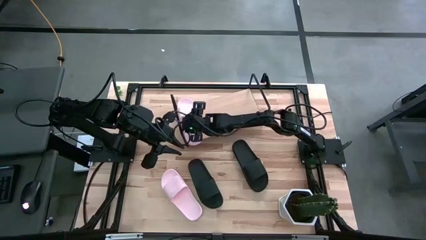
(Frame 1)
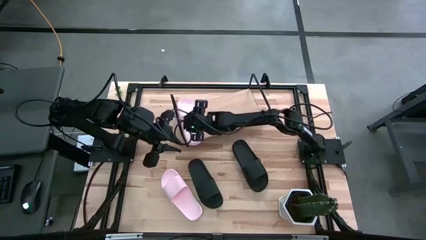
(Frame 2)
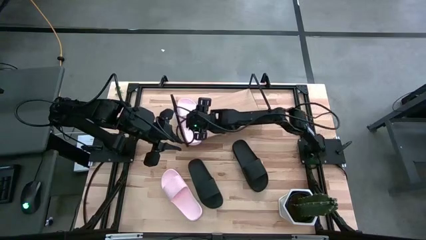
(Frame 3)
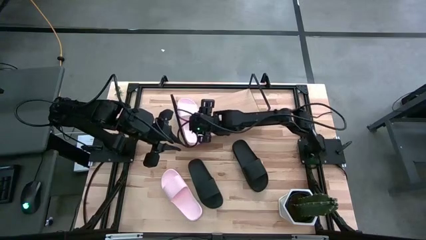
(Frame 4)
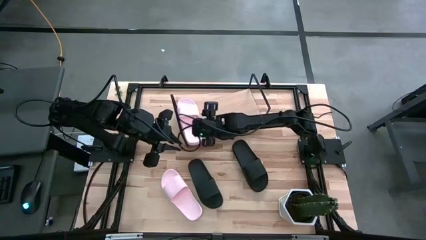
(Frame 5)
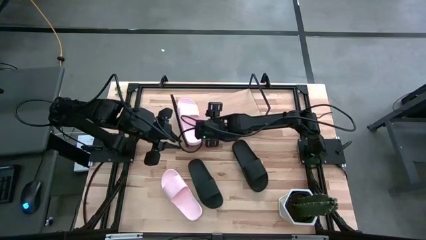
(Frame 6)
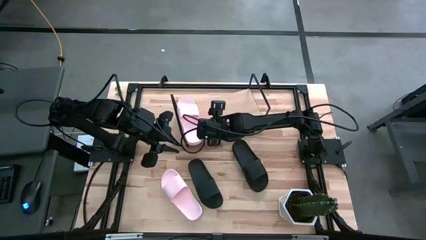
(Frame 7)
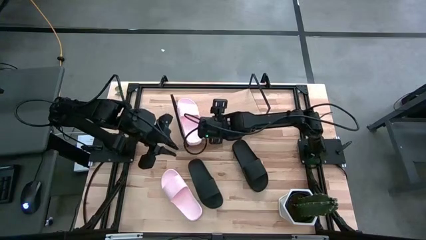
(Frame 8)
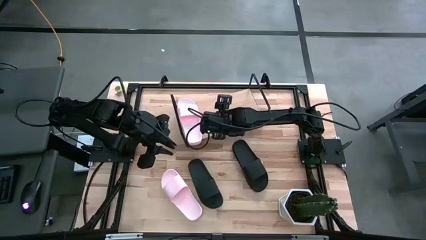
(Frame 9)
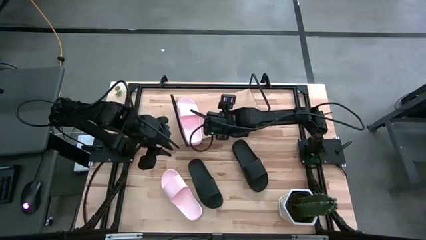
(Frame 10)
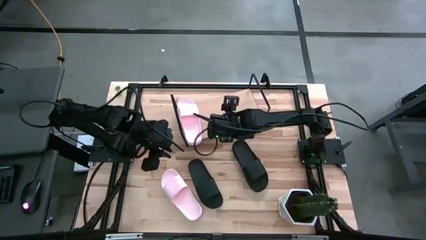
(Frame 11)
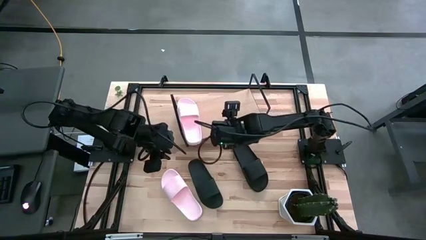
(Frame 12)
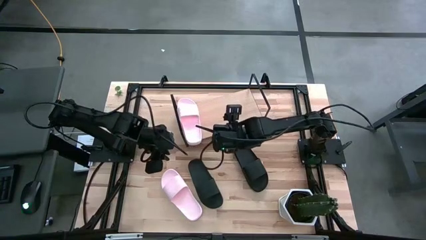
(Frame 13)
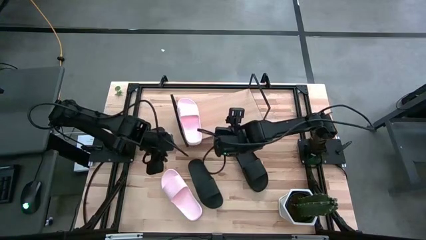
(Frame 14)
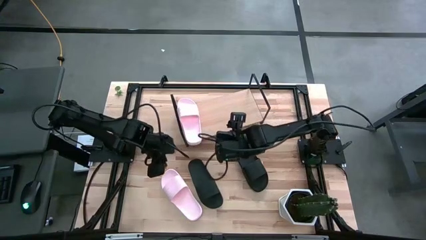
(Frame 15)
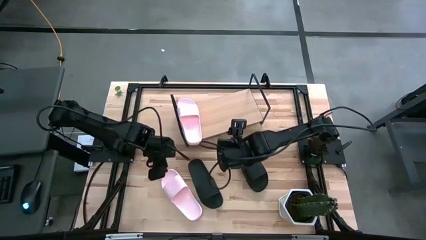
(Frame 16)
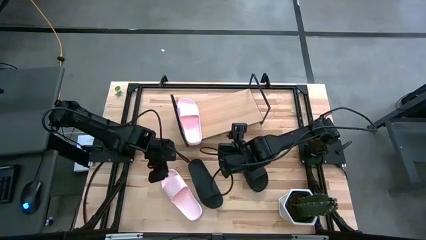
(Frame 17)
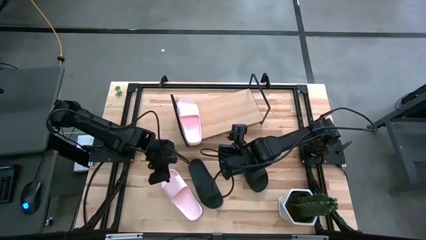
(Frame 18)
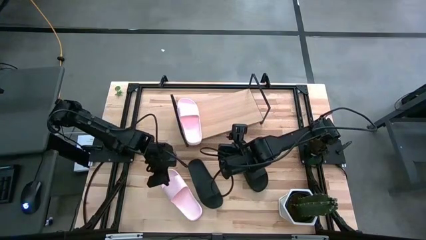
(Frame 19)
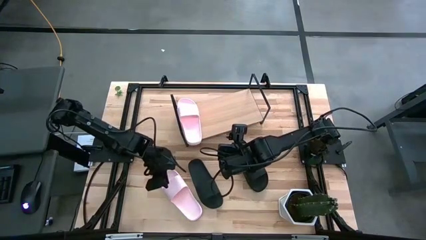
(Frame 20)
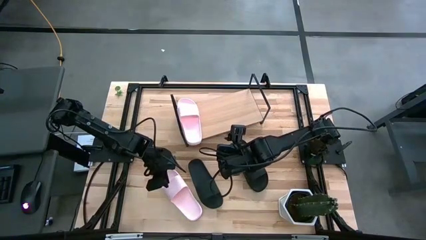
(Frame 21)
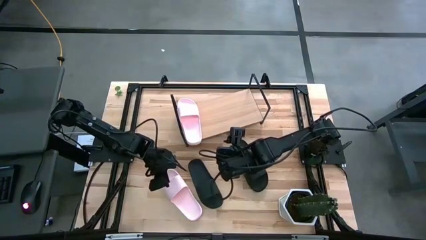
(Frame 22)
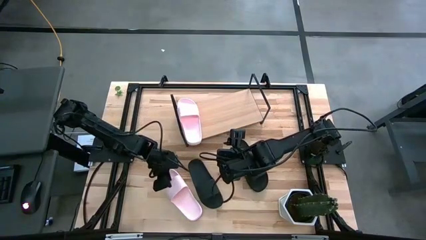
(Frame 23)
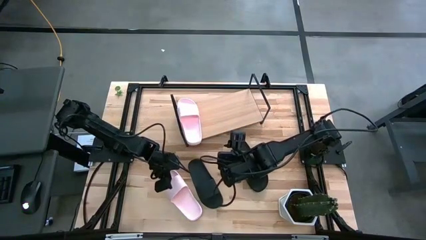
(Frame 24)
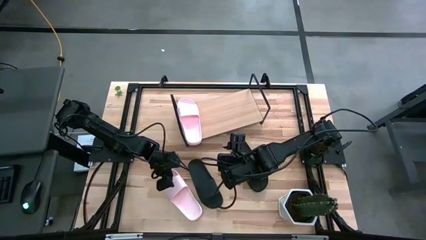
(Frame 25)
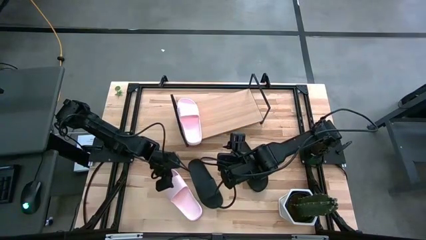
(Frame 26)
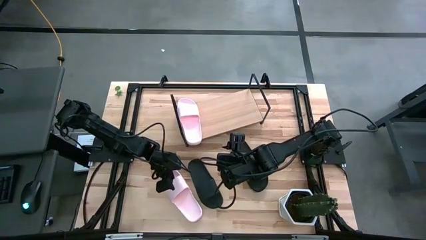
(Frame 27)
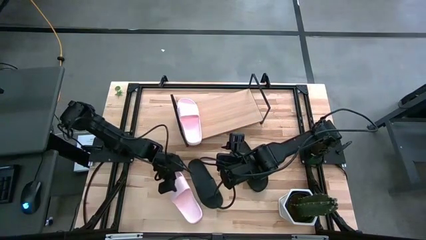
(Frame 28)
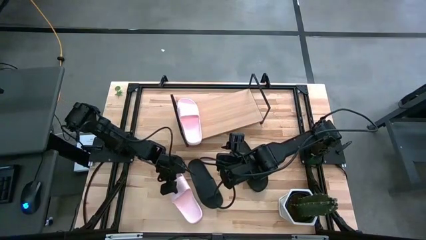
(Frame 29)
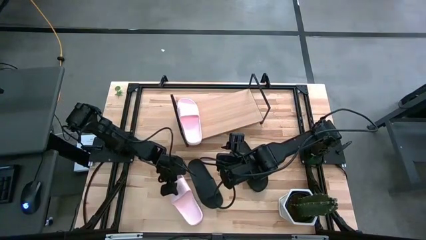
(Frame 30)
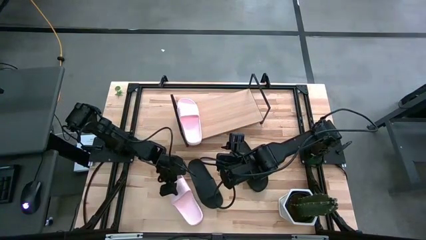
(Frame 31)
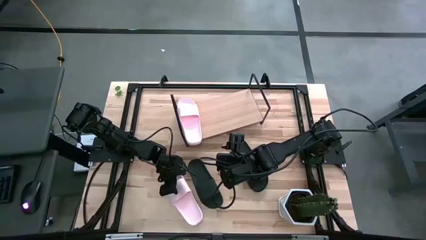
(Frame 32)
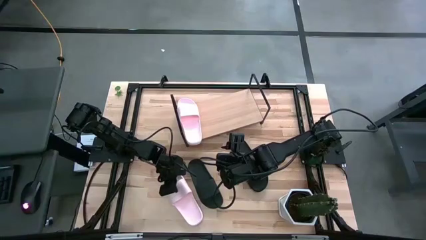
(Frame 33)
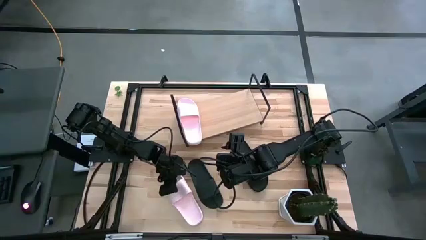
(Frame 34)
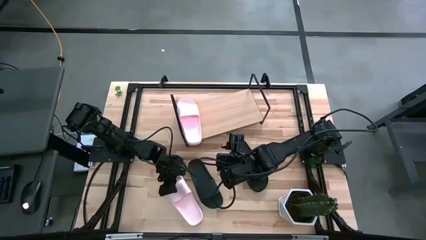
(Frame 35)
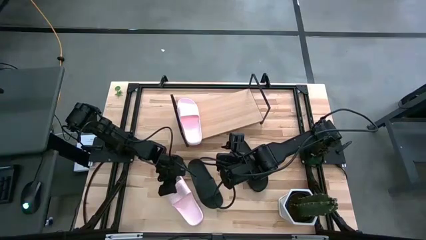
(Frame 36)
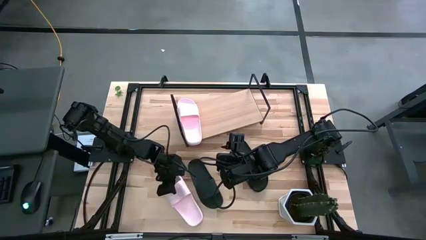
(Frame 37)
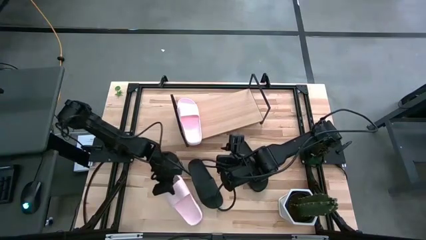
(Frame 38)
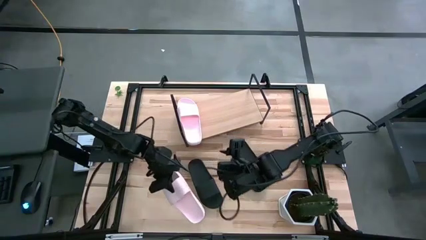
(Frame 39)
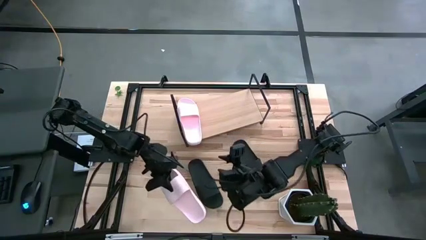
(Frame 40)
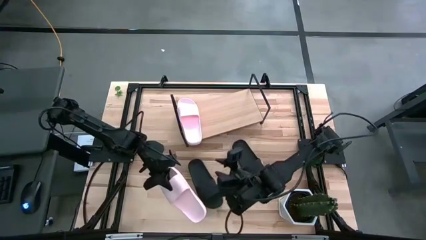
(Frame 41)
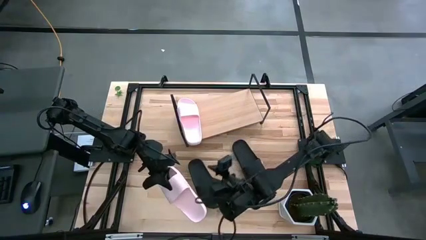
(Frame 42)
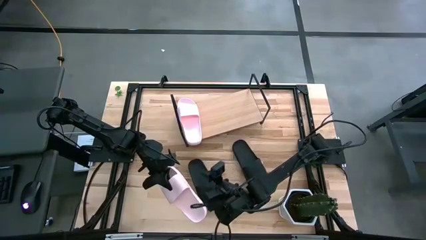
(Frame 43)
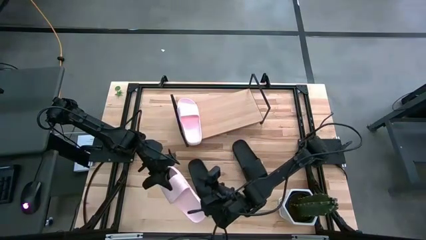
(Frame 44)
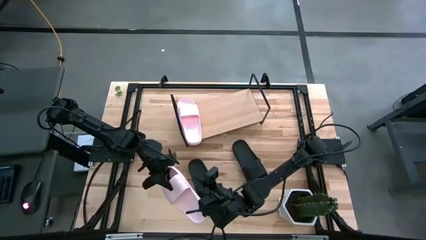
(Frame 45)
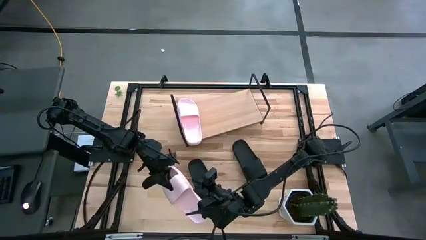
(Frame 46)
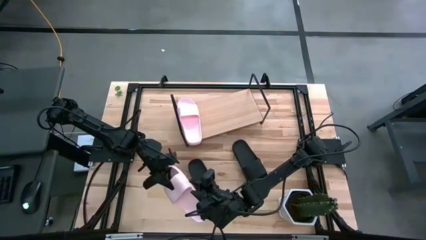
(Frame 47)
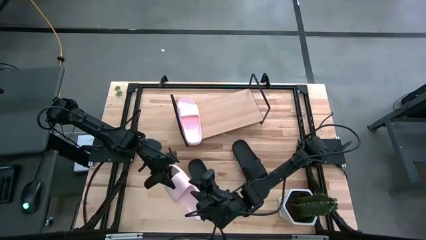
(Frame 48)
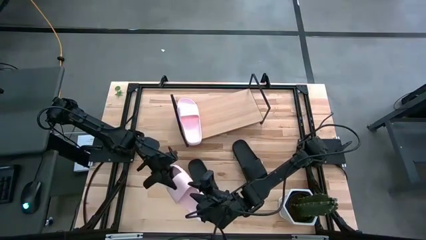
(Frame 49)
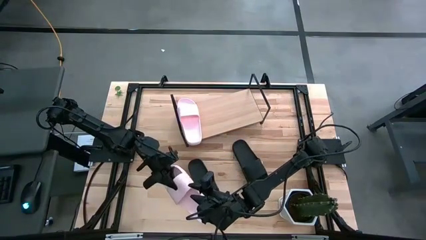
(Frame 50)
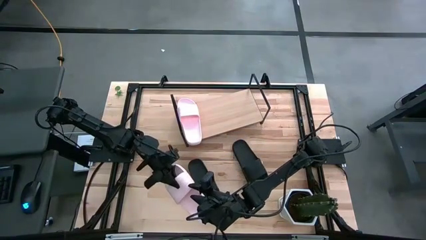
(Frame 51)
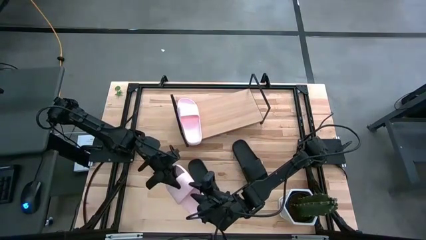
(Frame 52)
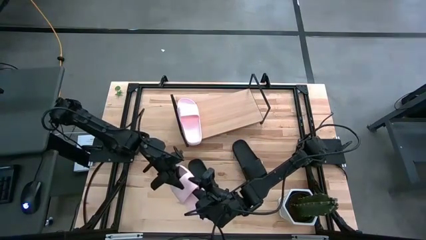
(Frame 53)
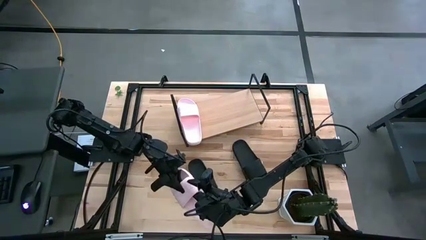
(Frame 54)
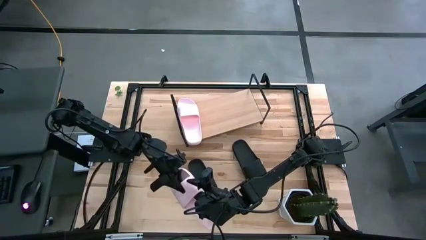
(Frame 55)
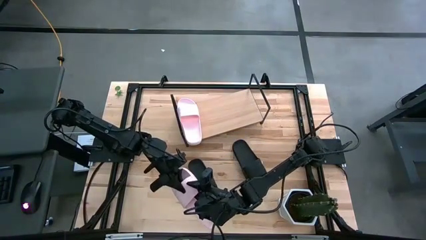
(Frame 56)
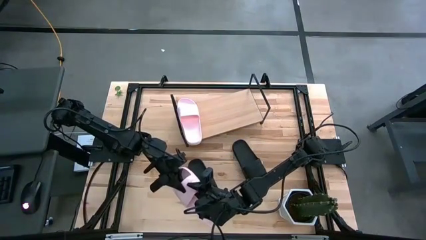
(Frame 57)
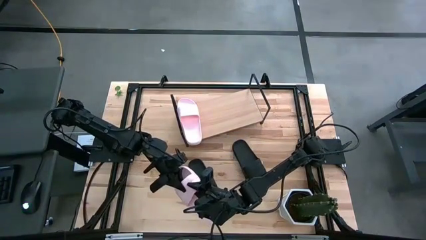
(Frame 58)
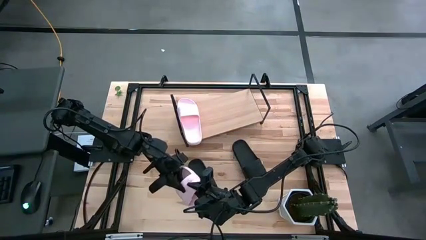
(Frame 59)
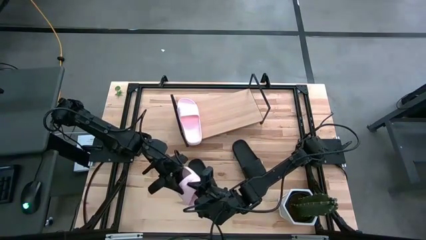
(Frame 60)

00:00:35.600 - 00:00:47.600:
Task: Pick and place slides into the shelf
Put the pink slide on the shelf
